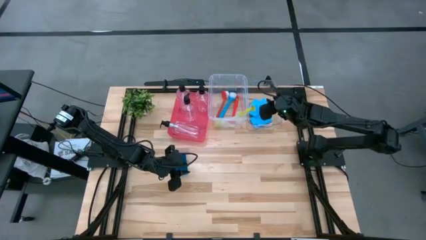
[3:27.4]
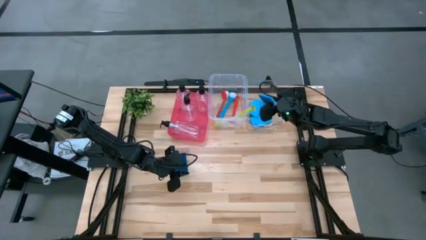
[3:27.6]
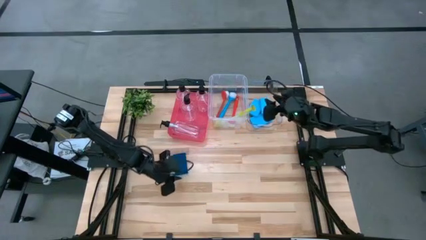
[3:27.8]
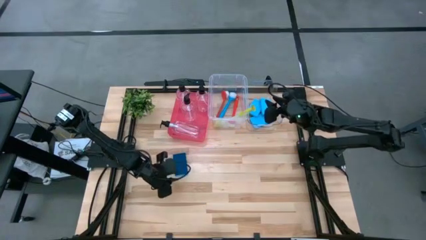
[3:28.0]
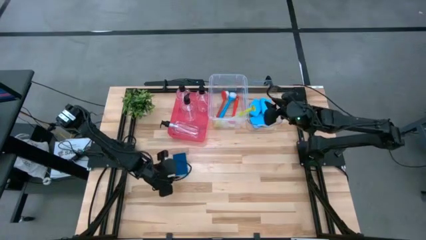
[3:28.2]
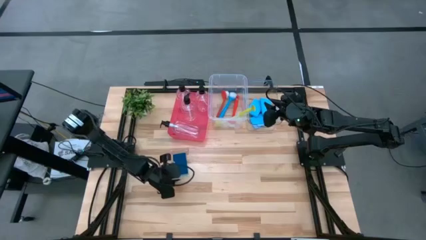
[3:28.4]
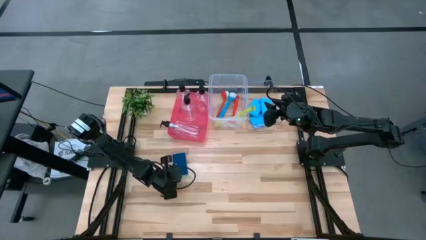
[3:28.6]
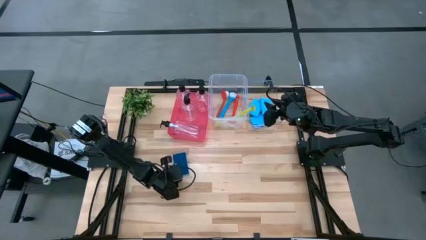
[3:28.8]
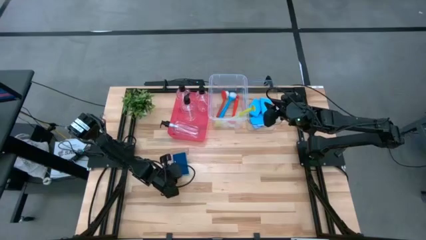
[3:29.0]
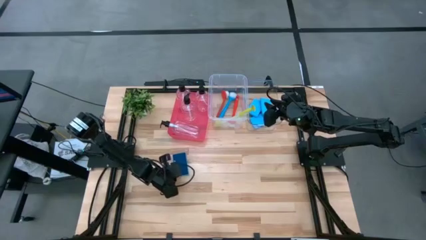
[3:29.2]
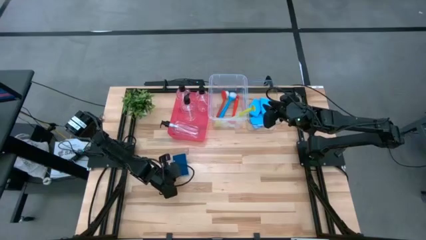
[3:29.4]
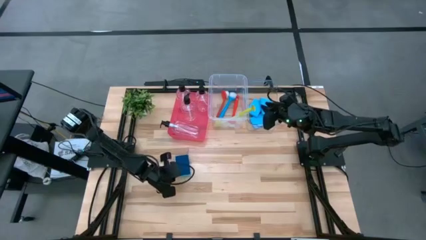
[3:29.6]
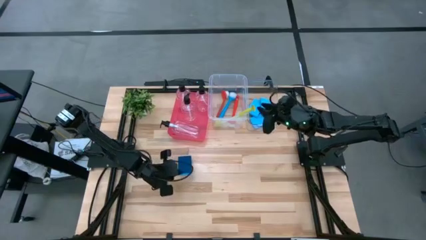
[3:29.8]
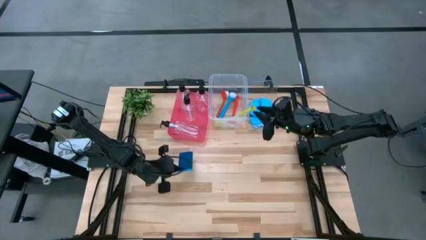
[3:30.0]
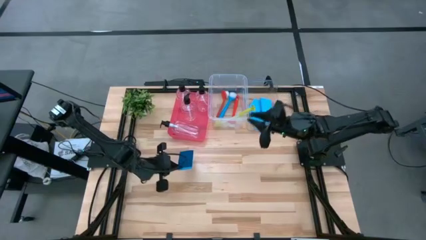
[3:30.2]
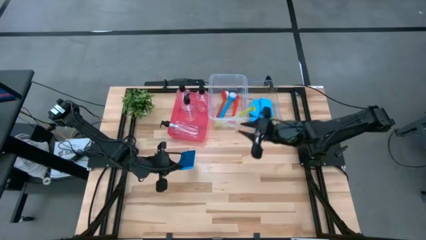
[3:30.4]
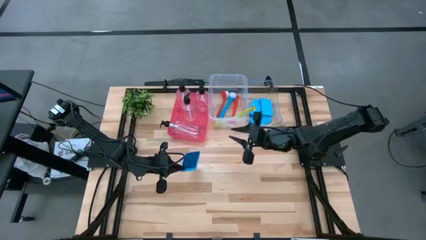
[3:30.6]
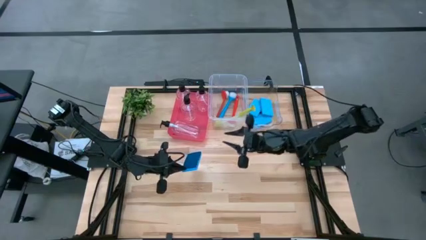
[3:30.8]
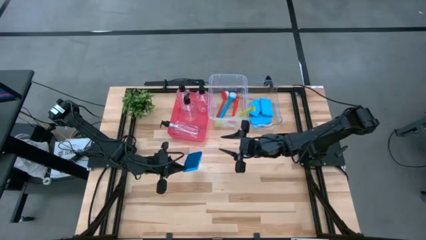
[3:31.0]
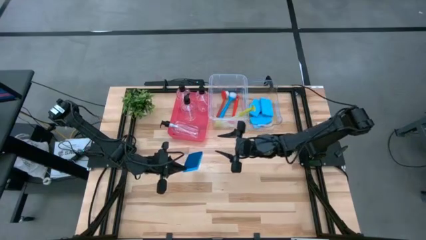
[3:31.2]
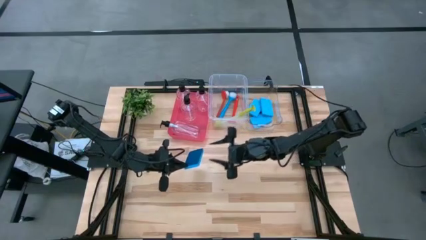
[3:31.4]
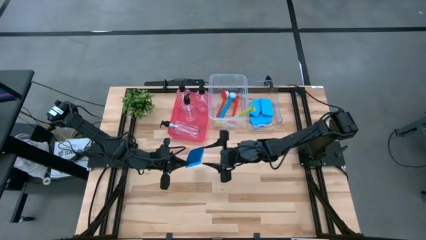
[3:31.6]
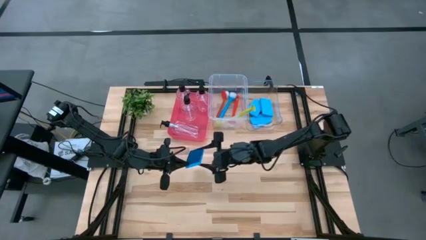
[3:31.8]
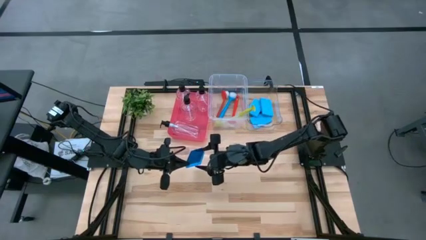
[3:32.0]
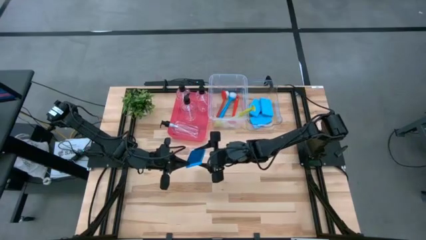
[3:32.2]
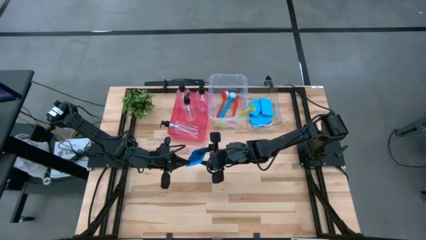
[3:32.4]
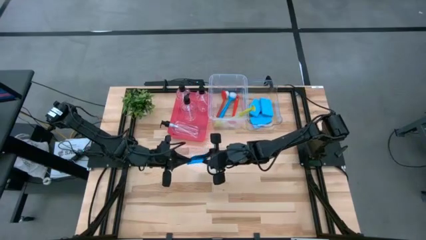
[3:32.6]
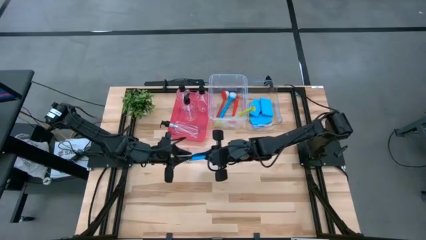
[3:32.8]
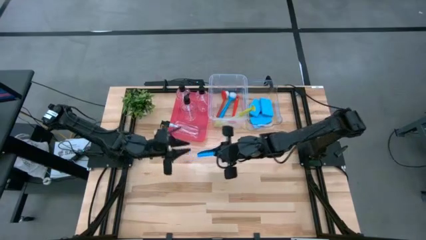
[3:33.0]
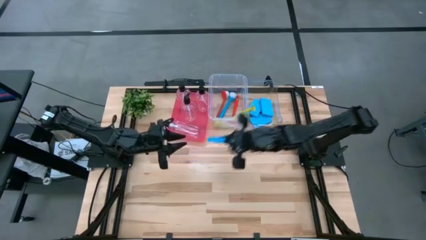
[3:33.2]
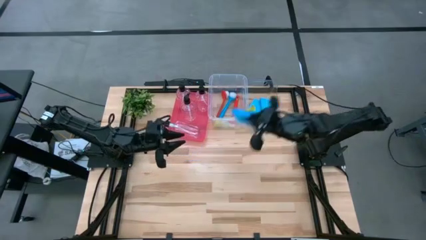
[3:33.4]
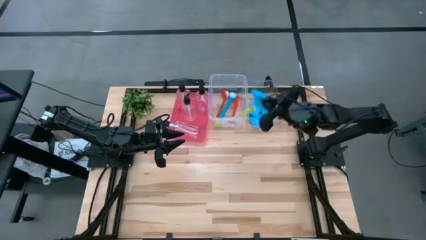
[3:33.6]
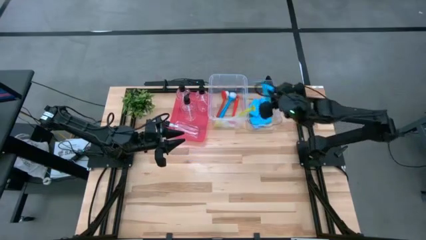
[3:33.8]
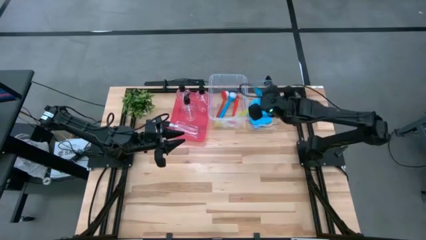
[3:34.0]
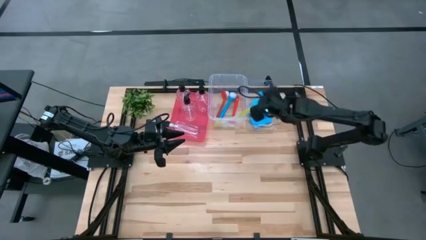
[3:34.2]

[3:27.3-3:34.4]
Task: Pick & Place Kitchen Sink Supplies
Put the blue sponge wipe into the transparent bin

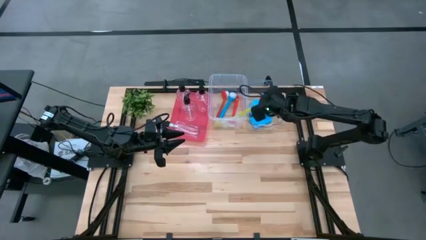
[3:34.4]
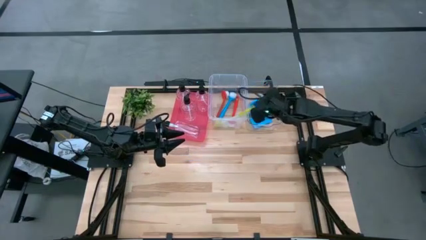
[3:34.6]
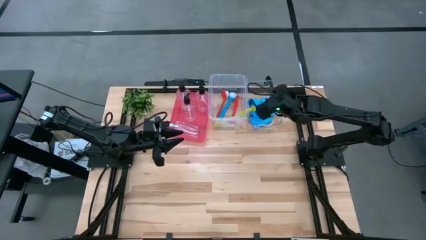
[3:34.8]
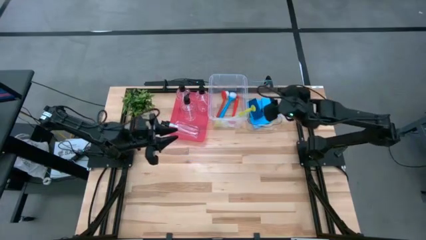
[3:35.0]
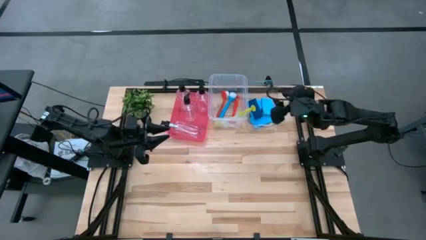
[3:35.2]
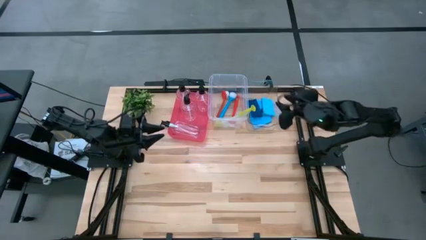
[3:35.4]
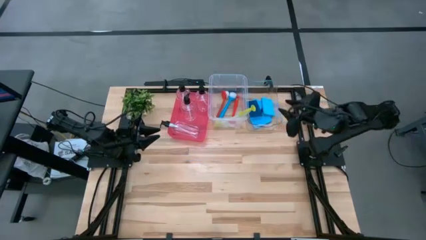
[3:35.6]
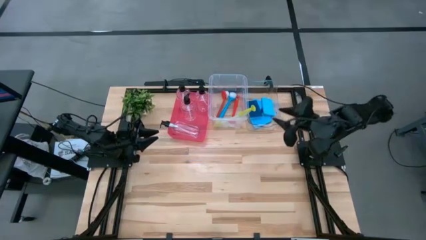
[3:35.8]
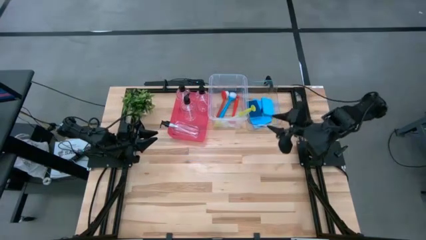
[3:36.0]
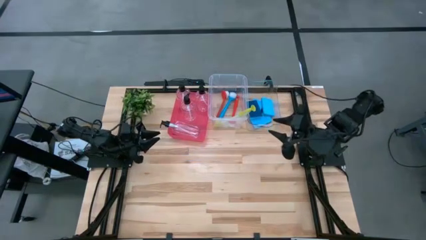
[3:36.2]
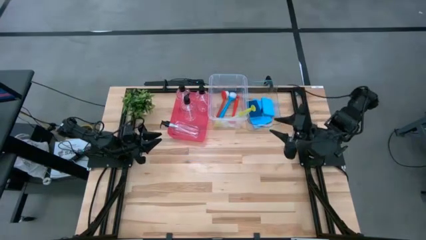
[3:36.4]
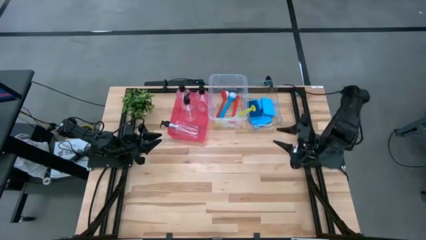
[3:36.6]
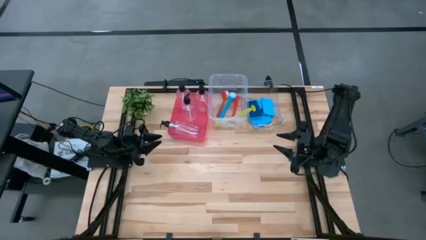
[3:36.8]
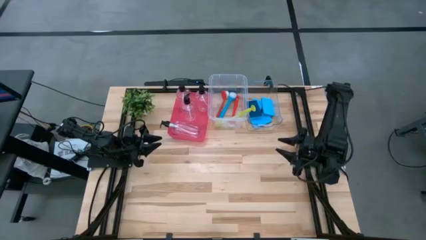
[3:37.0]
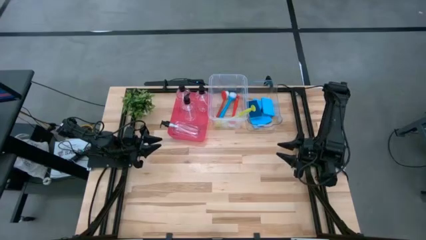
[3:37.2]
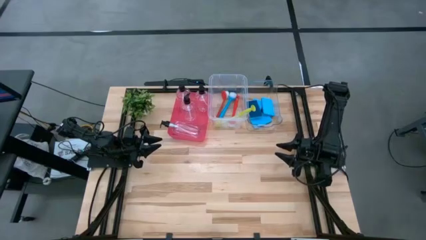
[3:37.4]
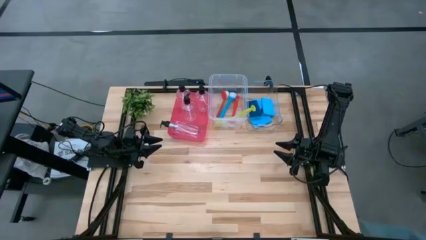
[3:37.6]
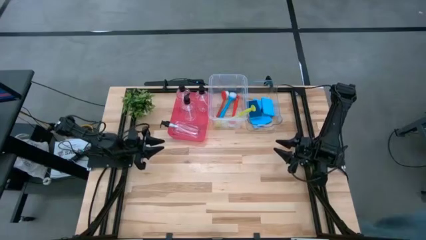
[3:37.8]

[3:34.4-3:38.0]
Return to Home Position

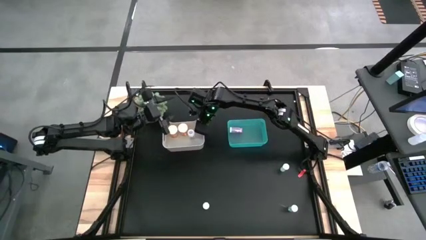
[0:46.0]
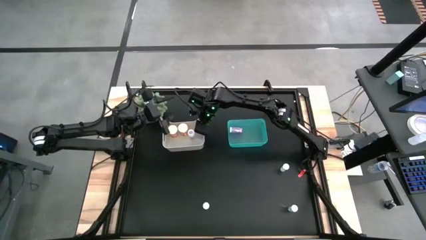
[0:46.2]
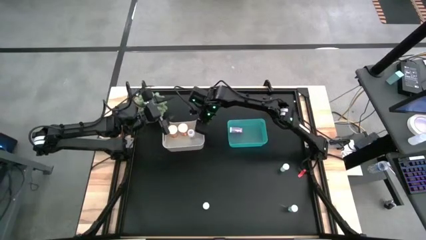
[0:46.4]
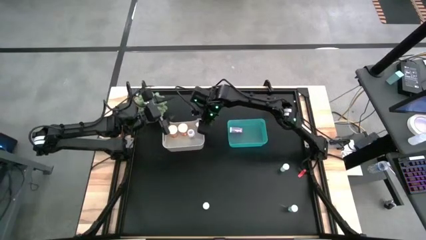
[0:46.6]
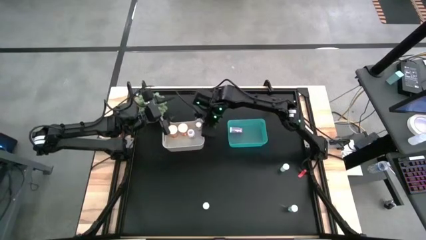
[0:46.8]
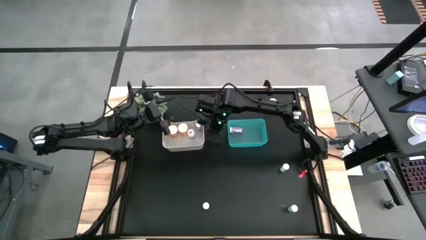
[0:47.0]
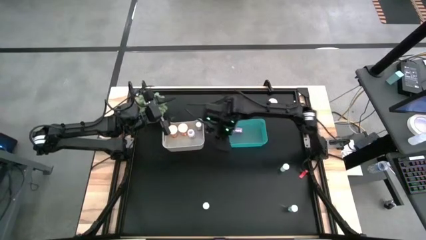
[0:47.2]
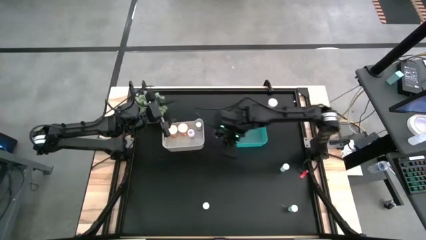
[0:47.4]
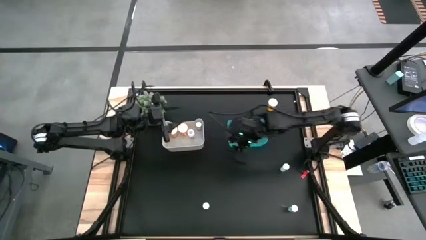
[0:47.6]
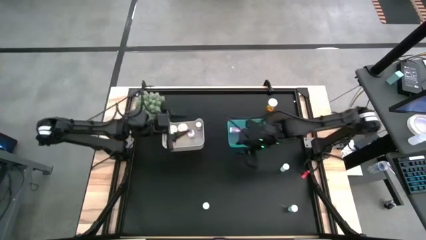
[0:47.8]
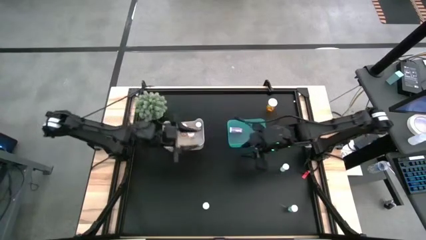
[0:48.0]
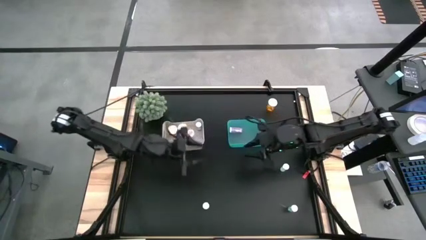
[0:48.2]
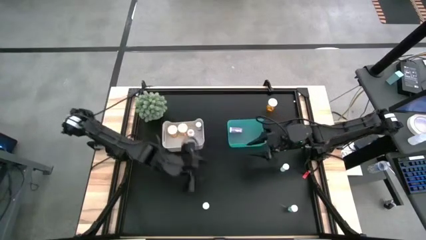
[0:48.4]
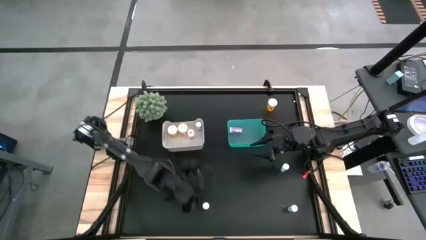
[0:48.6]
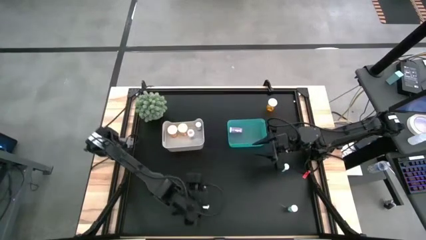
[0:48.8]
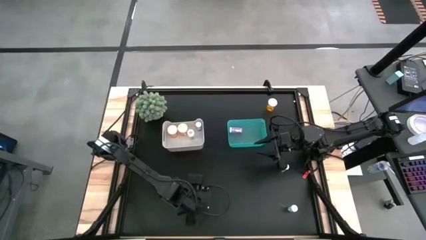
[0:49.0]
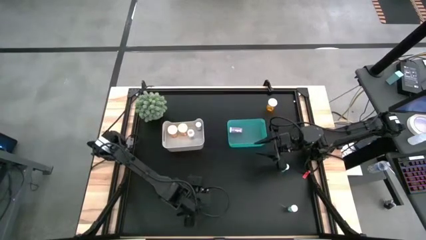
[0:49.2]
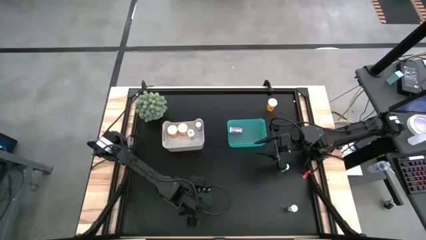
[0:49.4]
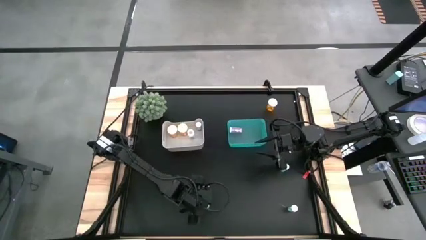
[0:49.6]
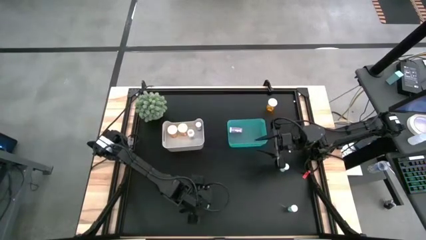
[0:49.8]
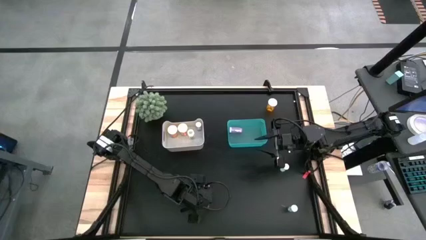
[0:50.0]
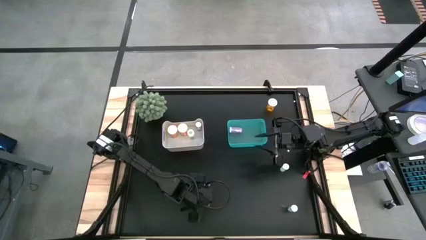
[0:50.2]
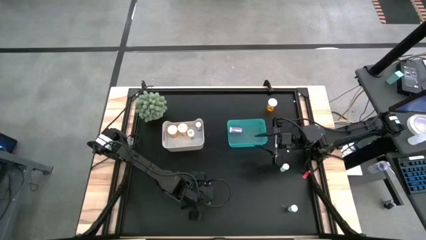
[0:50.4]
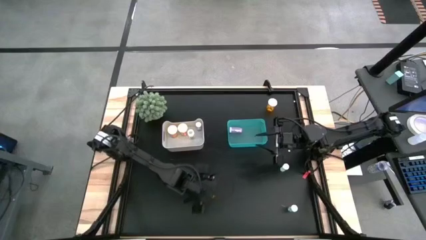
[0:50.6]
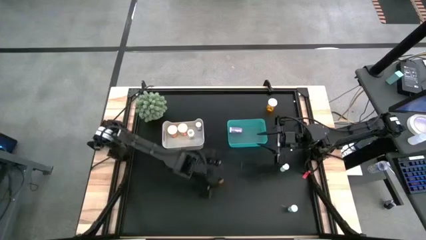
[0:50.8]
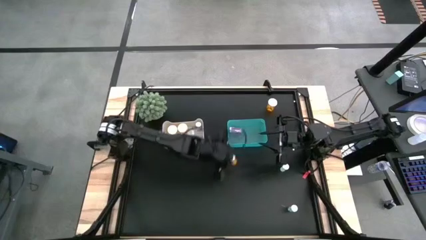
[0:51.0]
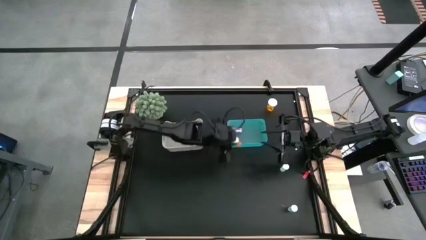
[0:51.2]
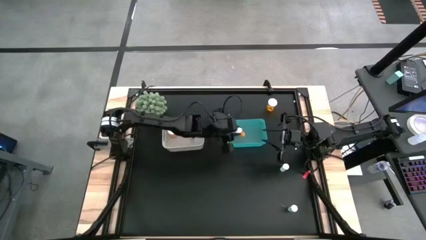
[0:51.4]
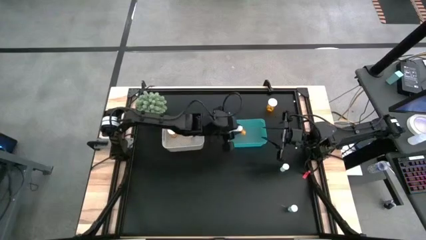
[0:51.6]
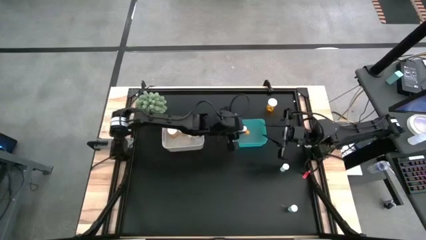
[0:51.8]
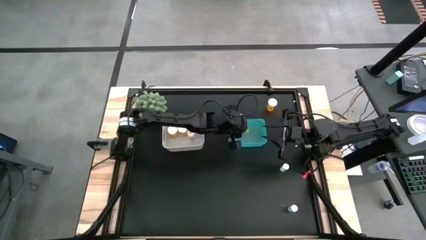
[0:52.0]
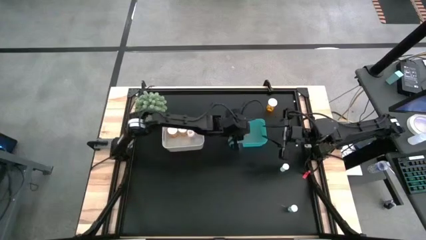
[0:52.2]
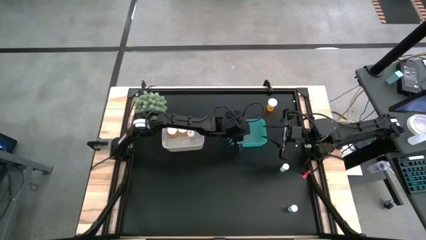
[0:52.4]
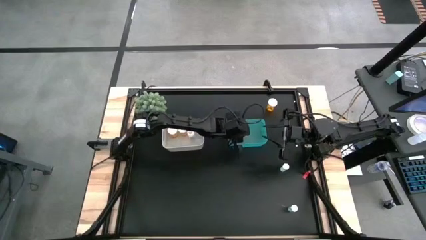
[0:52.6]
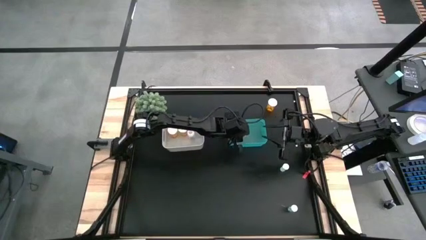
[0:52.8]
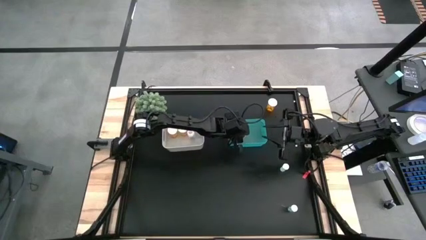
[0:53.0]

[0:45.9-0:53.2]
Task: Pick and place medicine bottles into bin by pill shape (circle, oval)
Put the small orange tablet bottle into the green bin
